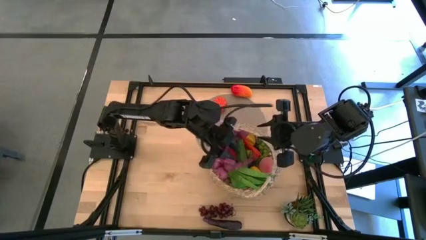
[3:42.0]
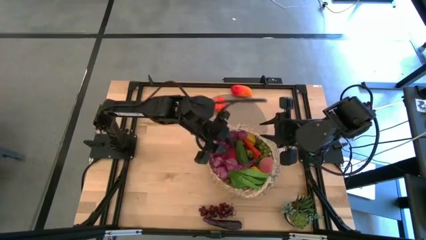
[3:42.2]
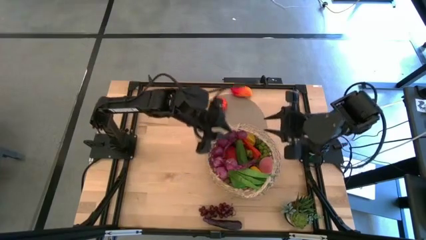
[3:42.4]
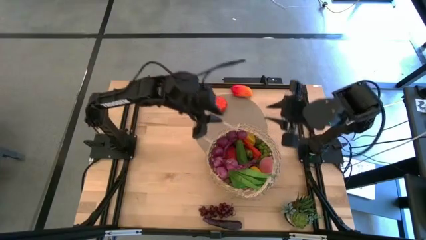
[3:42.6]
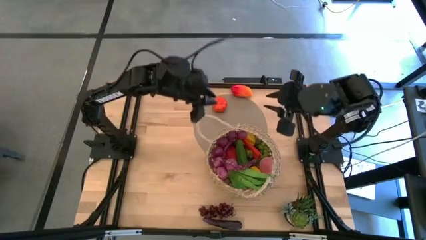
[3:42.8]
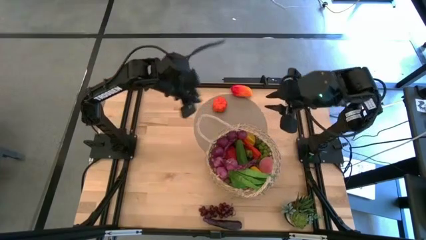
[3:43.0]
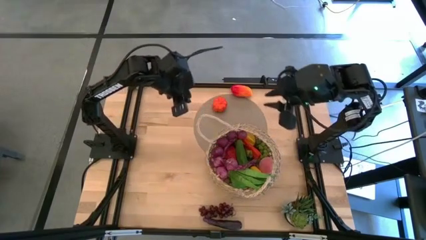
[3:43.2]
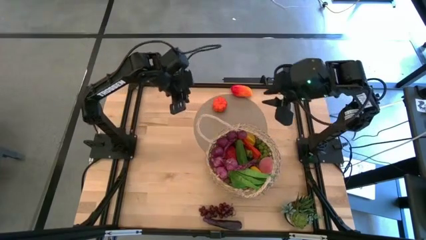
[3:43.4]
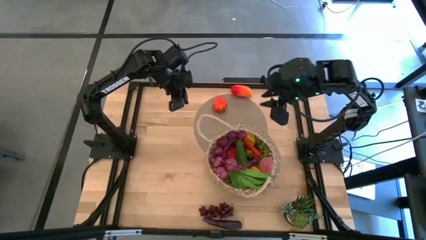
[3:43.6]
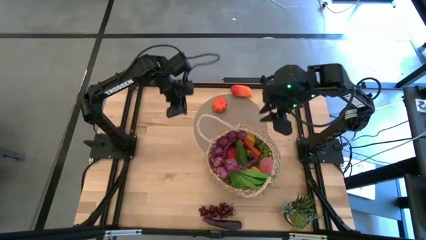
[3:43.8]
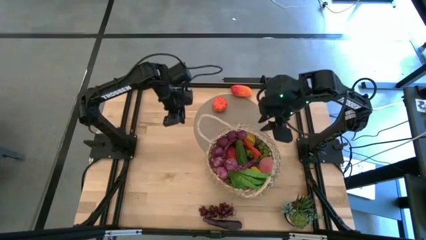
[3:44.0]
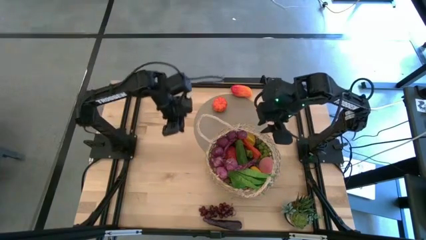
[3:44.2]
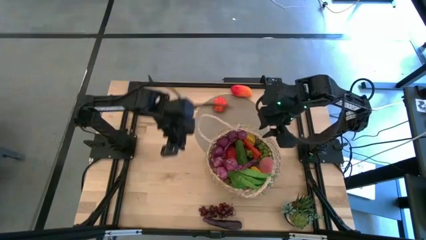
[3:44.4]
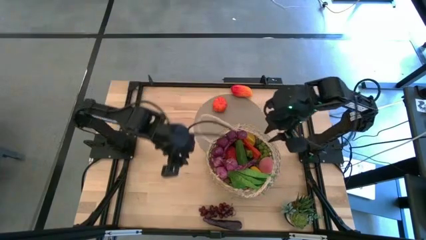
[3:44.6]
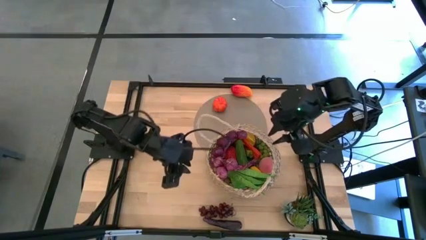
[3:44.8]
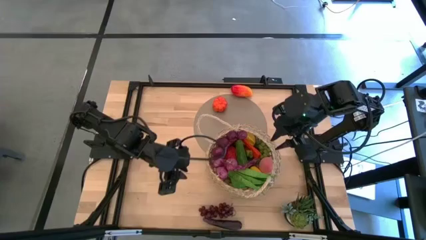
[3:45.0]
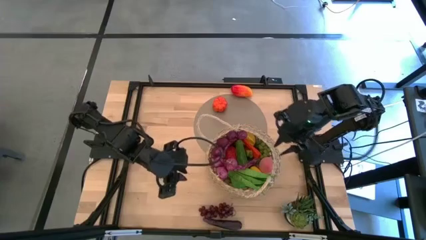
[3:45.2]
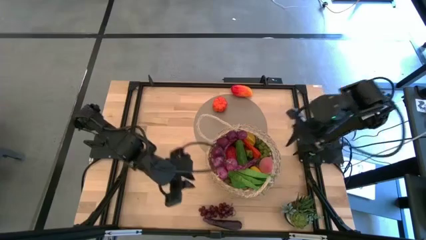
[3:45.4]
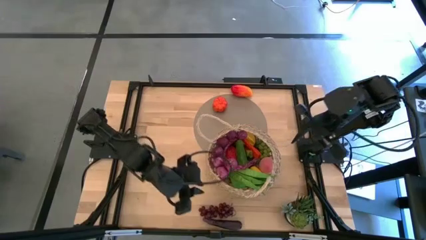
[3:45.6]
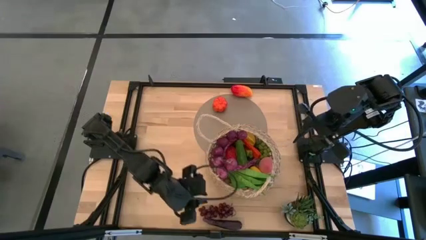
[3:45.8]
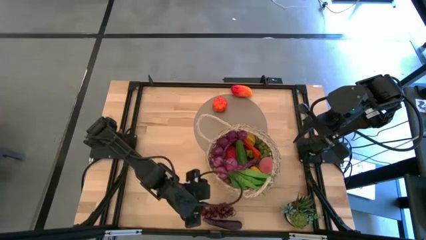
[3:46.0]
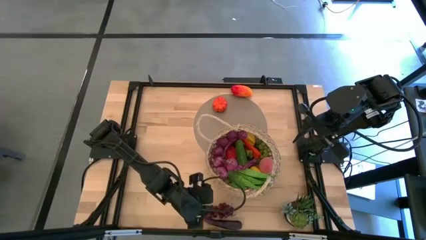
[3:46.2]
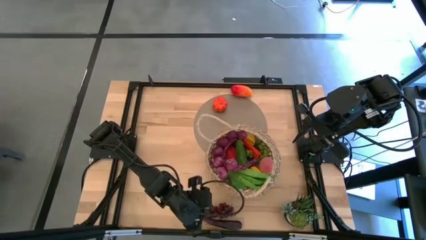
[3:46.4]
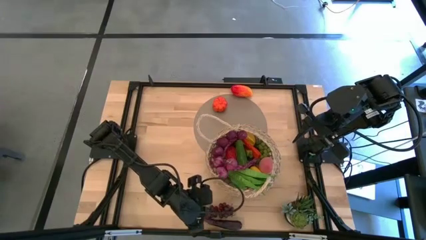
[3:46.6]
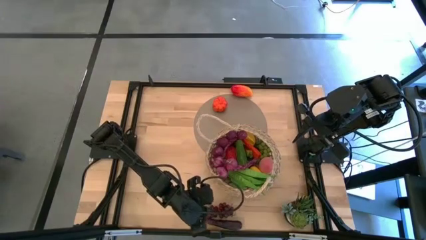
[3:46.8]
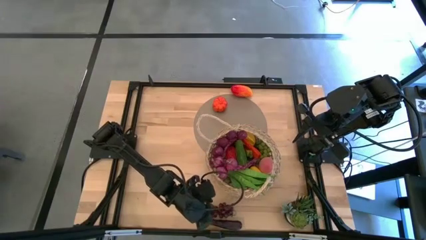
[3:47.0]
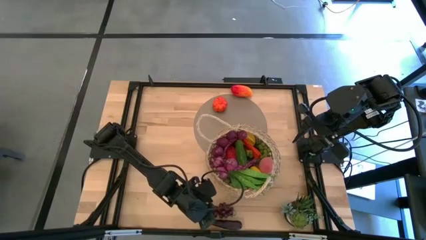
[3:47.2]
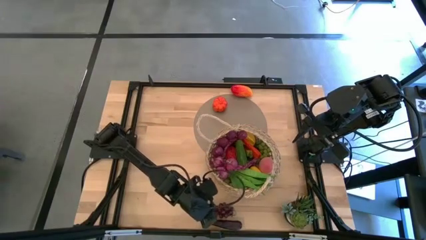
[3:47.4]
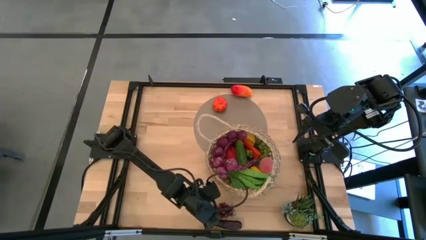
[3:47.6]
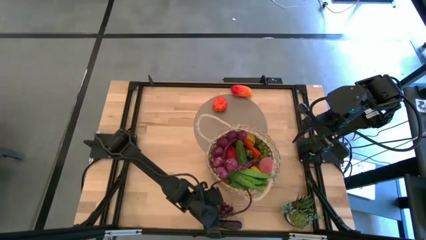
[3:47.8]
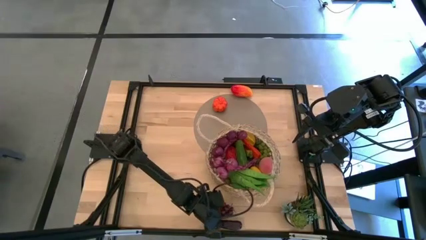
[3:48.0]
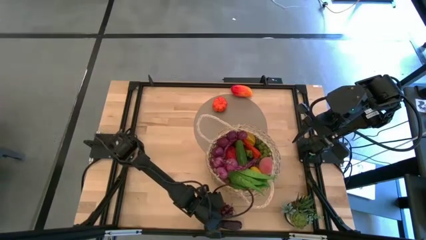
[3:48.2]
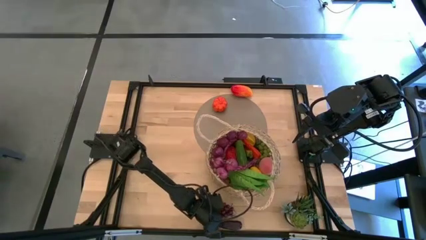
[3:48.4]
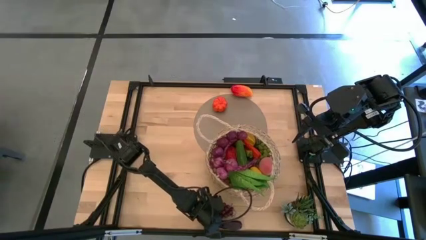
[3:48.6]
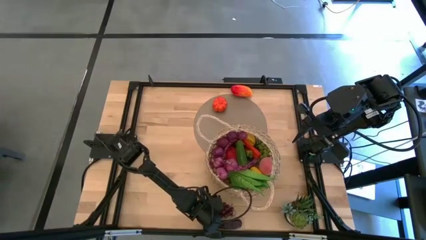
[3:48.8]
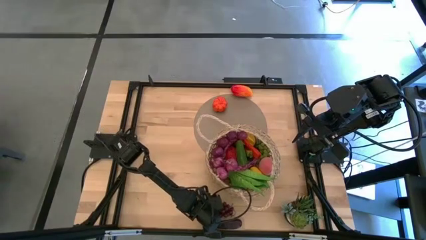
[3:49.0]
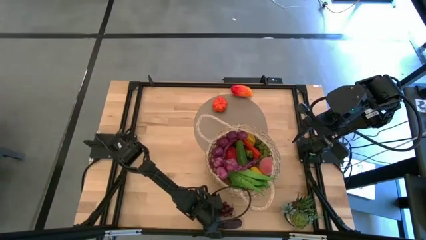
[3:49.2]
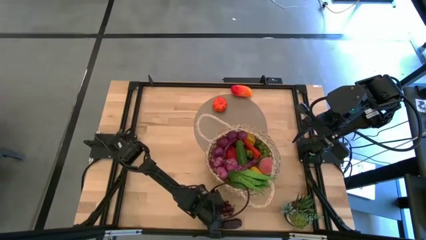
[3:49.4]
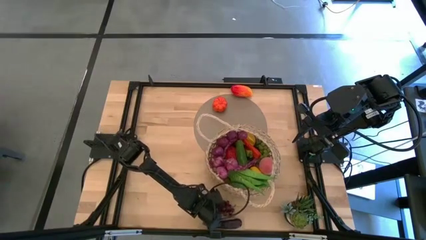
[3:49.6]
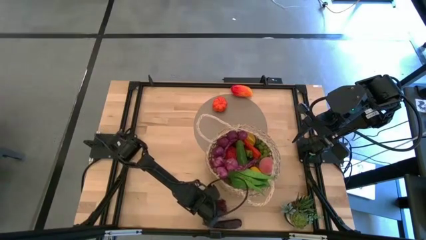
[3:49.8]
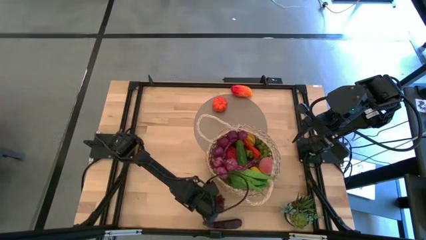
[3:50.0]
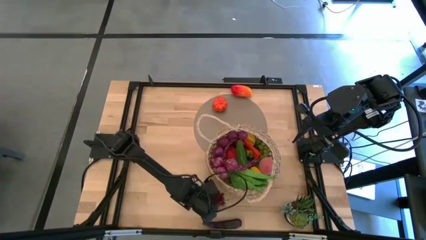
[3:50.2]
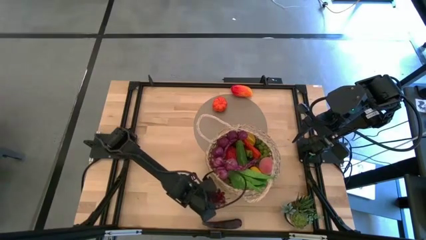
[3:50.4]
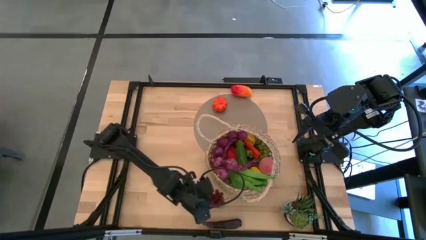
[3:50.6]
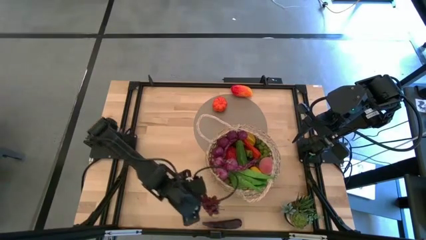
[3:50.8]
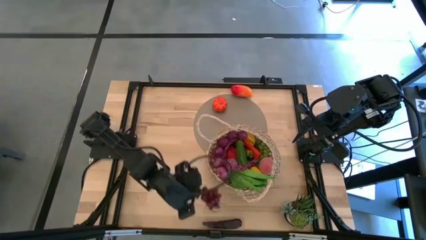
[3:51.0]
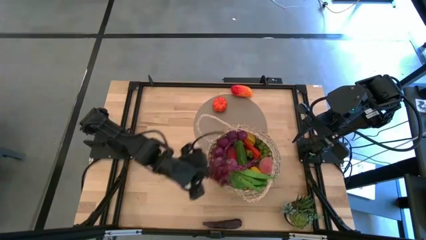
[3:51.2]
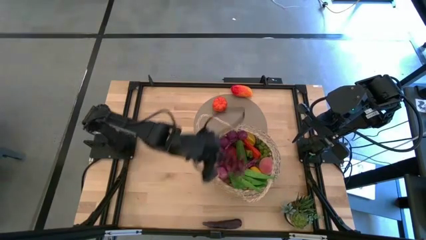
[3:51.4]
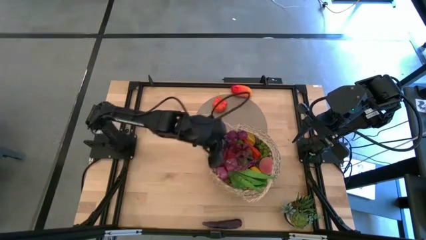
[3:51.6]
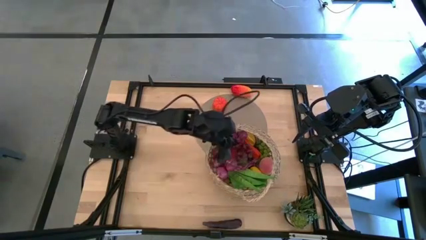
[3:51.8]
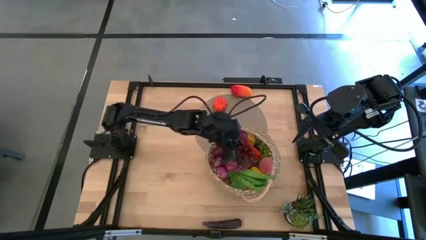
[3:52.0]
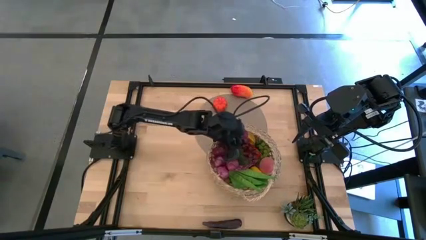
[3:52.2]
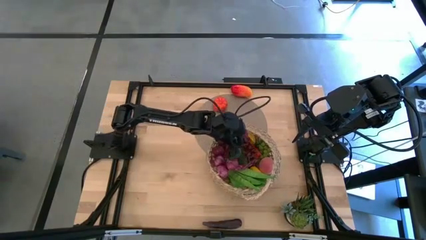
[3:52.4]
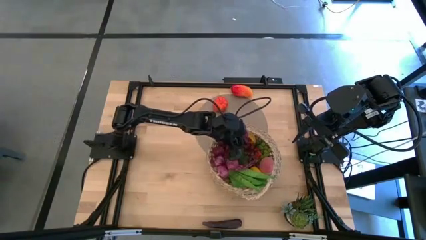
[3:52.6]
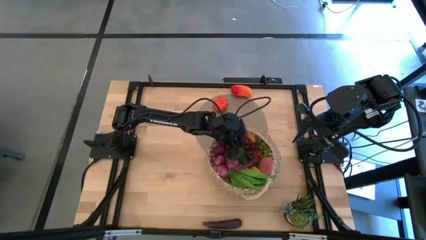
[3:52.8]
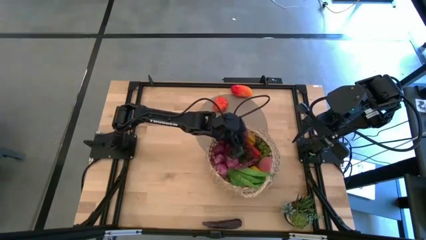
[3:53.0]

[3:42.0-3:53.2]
Task: Build produce basket
Put the red grapes into the brown basket

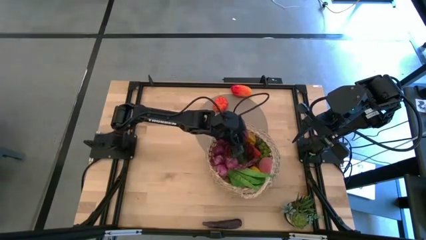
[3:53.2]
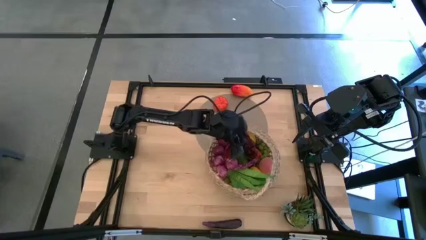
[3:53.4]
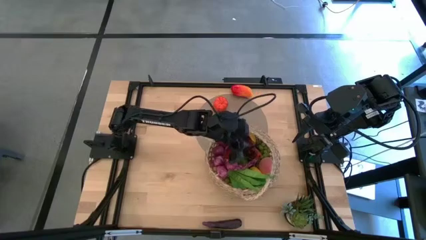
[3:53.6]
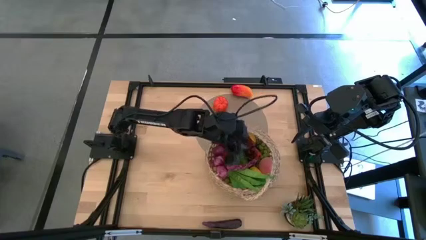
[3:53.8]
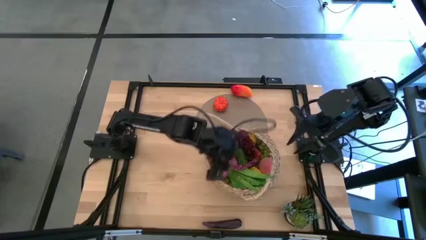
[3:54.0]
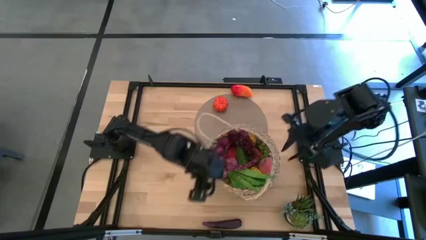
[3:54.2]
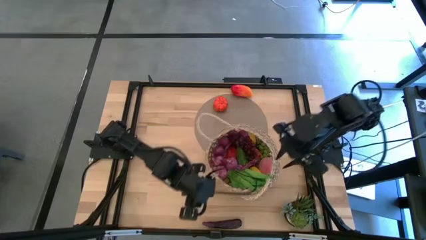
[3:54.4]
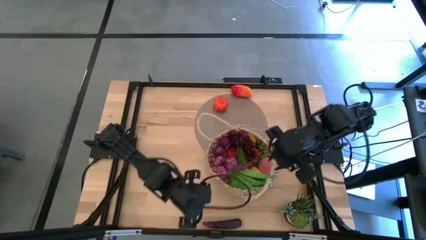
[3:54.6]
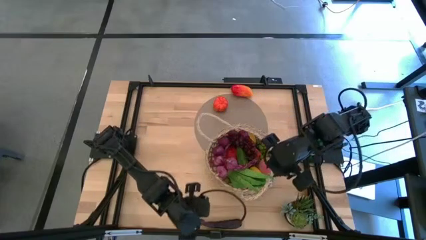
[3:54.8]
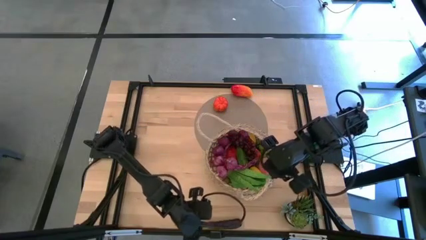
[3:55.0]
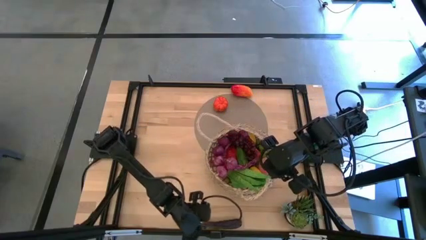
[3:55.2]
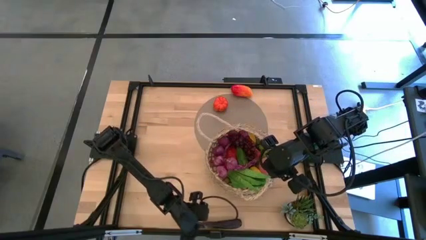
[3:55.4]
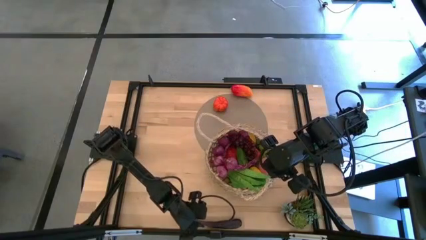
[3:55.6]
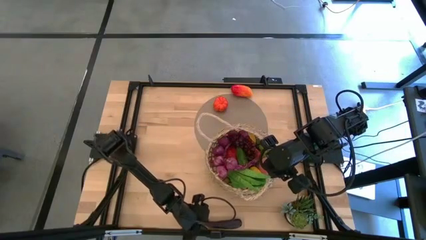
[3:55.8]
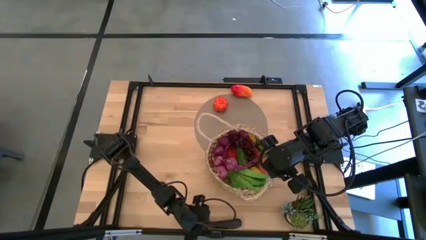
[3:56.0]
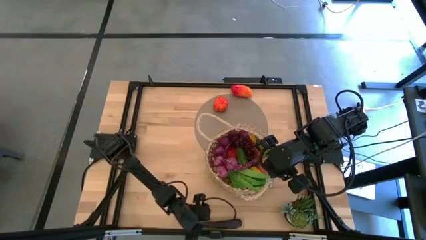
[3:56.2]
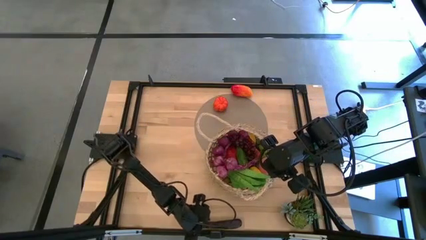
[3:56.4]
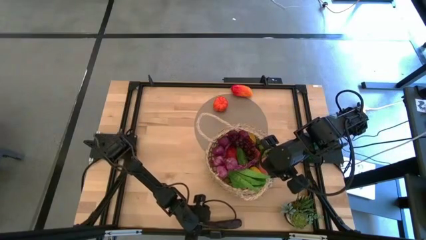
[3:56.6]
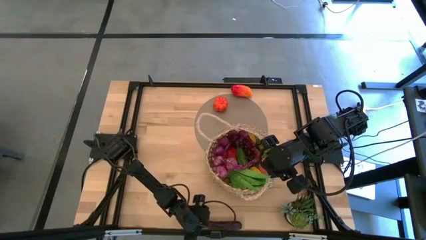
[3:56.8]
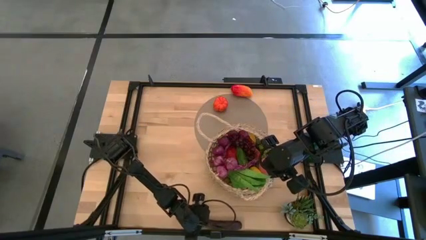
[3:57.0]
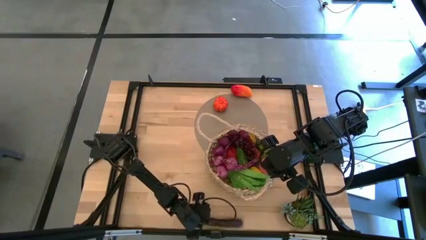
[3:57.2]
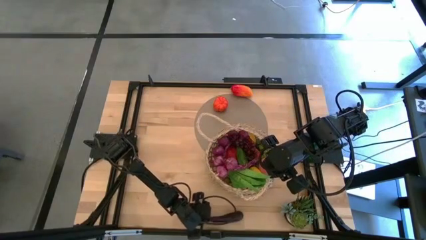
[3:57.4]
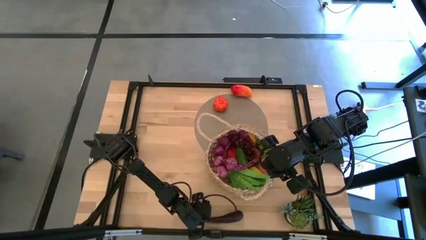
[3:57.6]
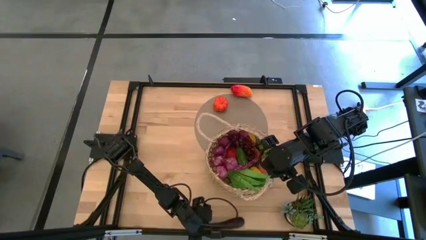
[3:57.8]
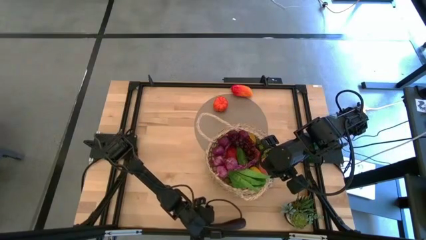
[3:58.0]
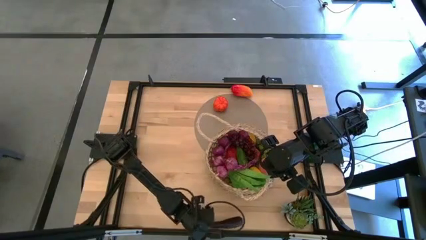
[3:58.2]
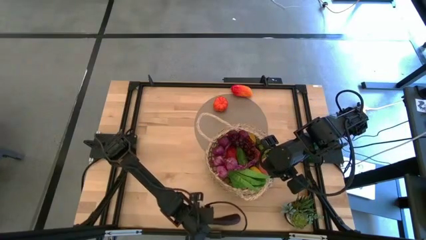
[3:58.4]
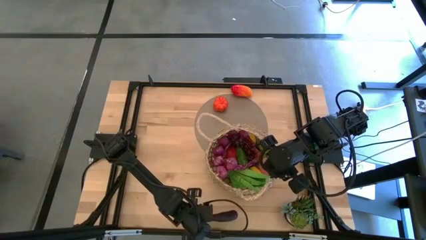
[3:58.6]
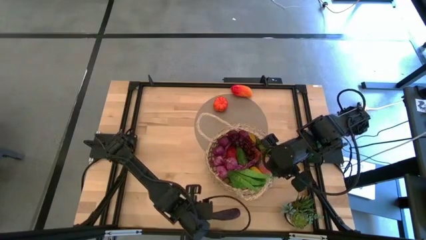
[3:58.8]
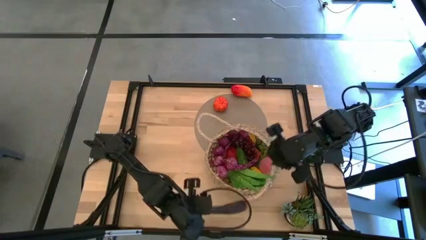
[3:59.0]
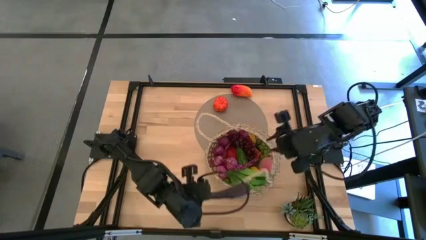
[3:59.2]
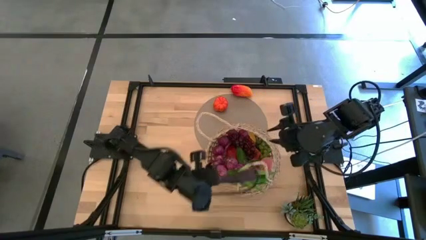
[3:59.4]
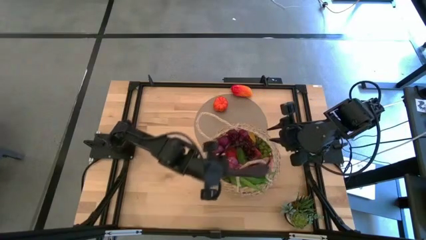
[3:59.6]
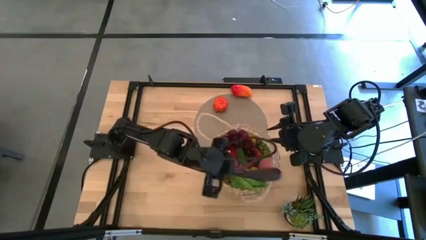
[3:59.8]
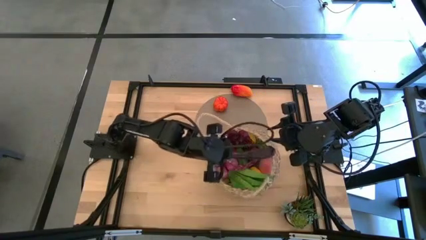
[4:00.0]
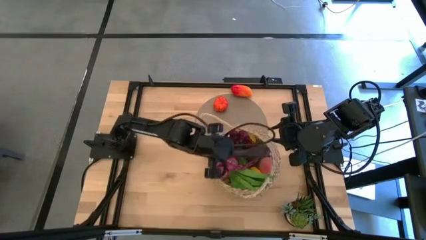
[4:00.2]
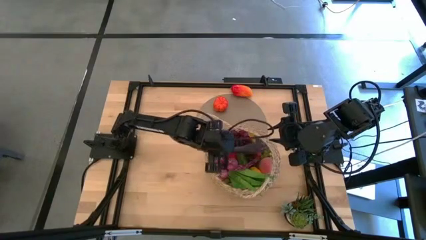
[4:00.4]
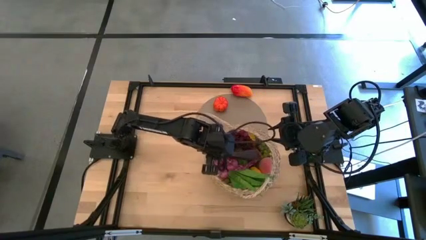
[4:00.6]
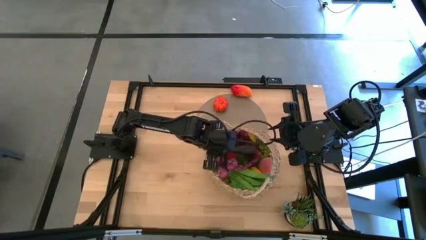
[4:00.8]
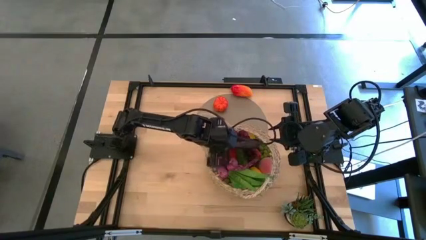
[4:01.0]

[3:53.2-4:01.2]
Put the purple eggplant into brown basket
